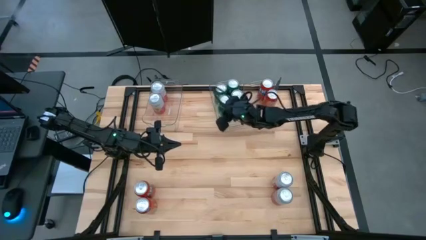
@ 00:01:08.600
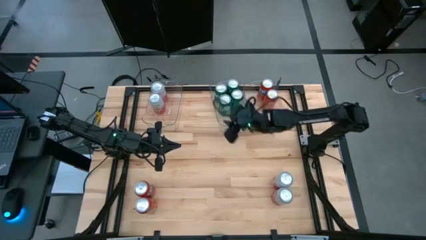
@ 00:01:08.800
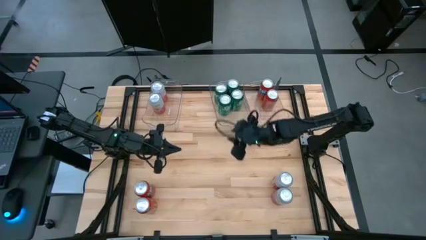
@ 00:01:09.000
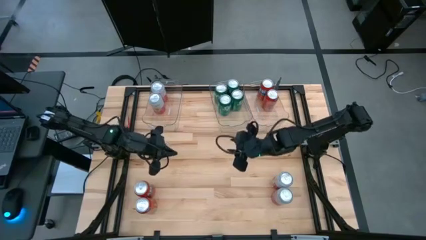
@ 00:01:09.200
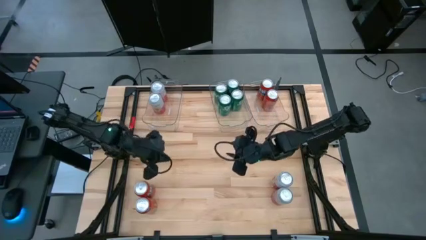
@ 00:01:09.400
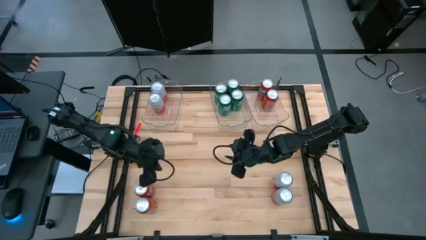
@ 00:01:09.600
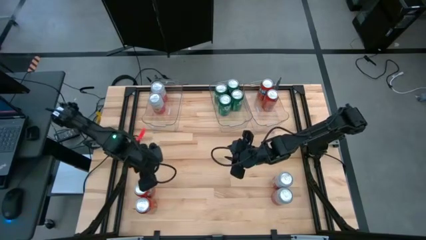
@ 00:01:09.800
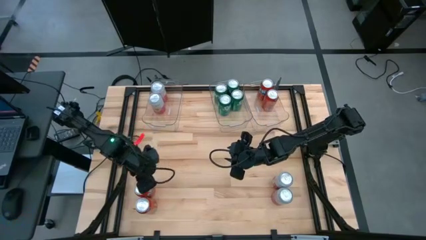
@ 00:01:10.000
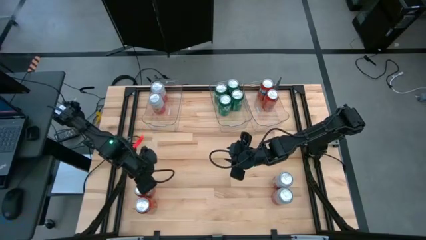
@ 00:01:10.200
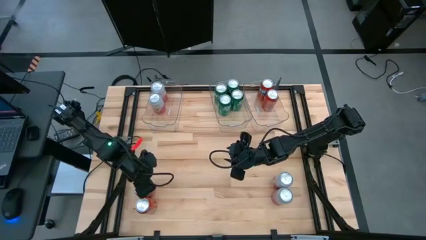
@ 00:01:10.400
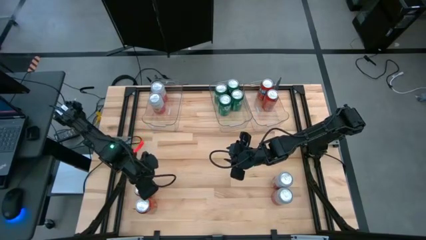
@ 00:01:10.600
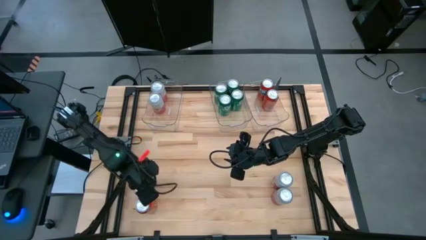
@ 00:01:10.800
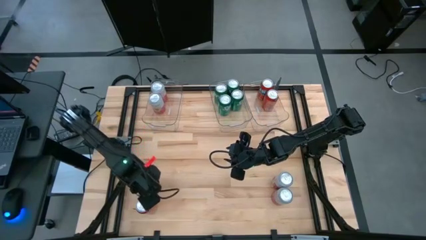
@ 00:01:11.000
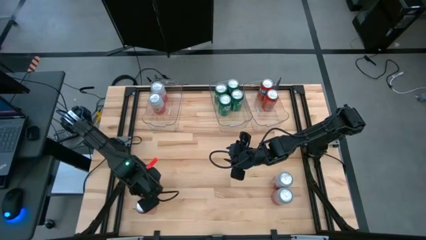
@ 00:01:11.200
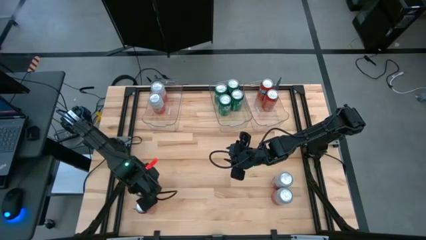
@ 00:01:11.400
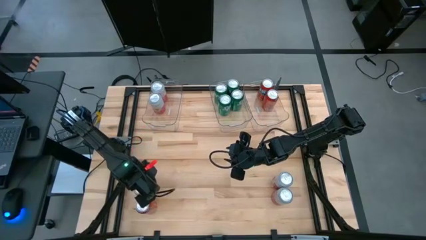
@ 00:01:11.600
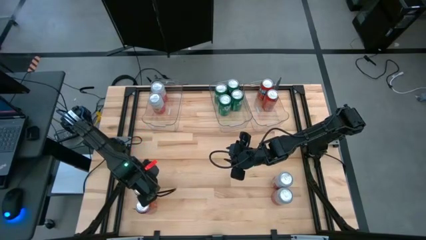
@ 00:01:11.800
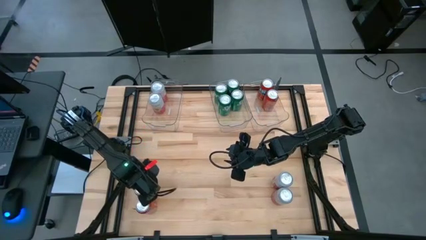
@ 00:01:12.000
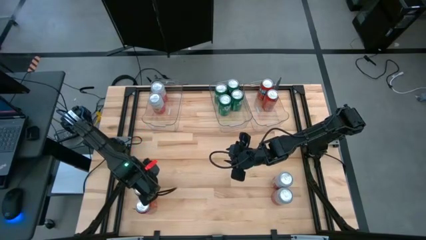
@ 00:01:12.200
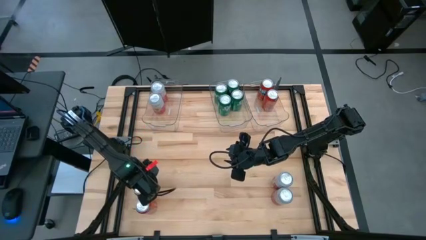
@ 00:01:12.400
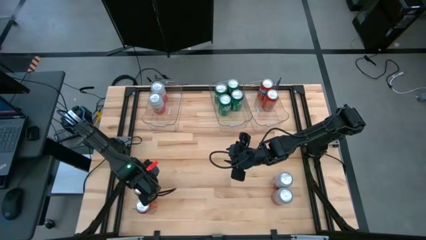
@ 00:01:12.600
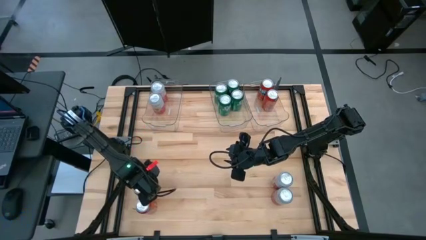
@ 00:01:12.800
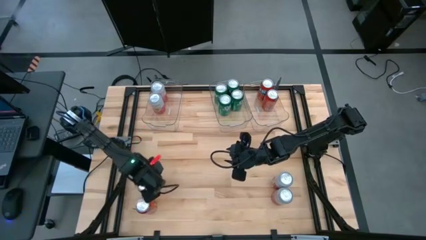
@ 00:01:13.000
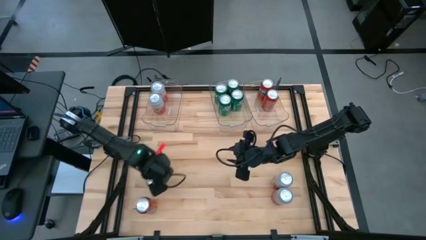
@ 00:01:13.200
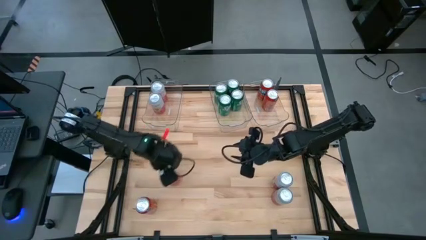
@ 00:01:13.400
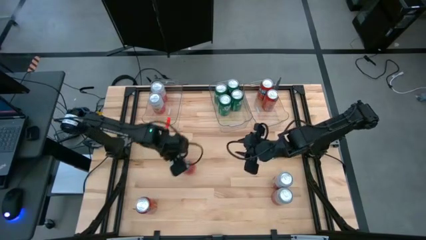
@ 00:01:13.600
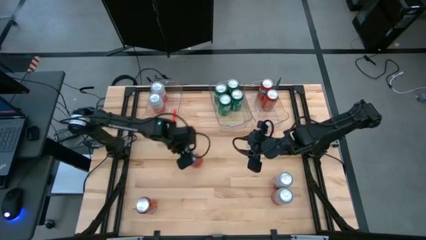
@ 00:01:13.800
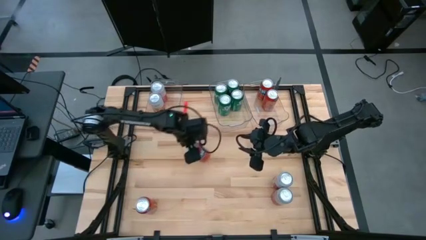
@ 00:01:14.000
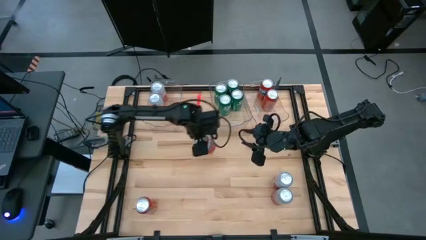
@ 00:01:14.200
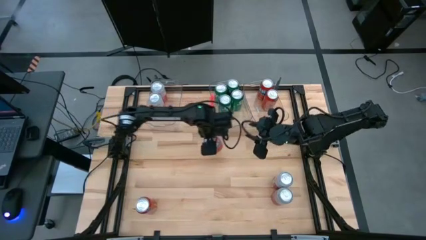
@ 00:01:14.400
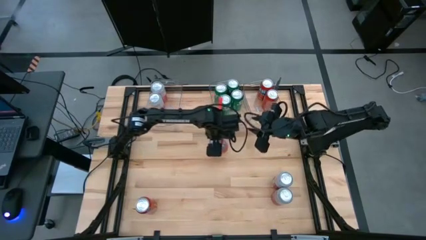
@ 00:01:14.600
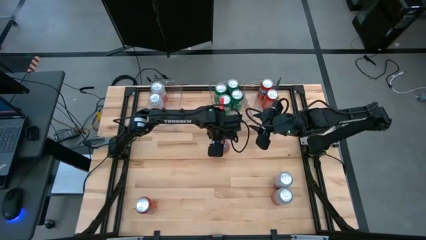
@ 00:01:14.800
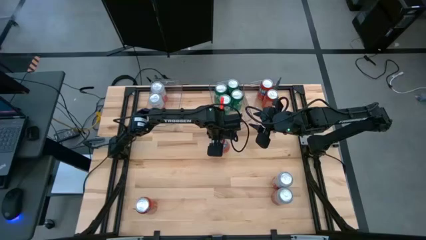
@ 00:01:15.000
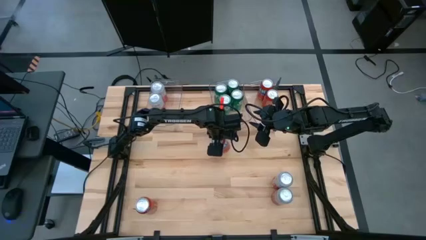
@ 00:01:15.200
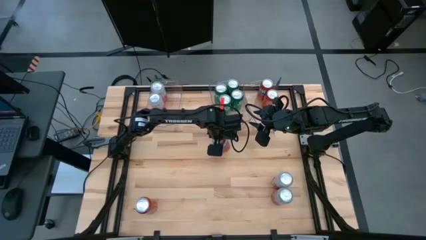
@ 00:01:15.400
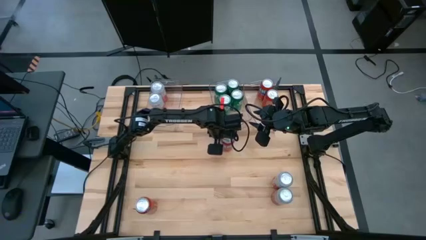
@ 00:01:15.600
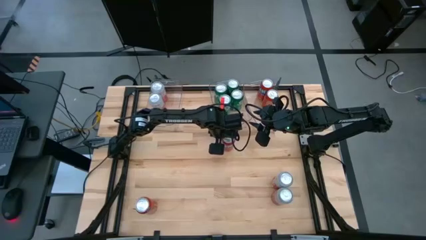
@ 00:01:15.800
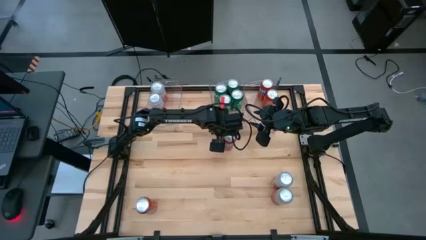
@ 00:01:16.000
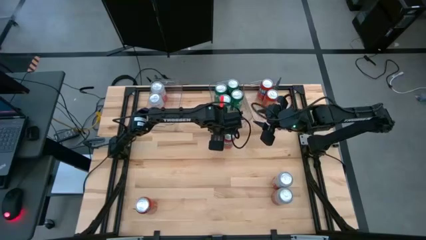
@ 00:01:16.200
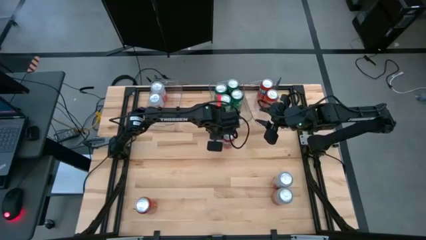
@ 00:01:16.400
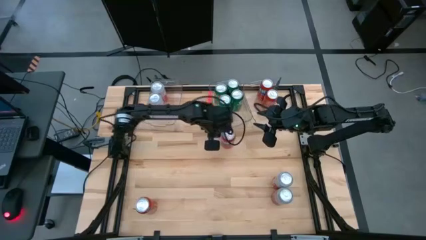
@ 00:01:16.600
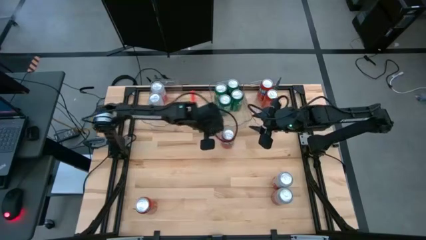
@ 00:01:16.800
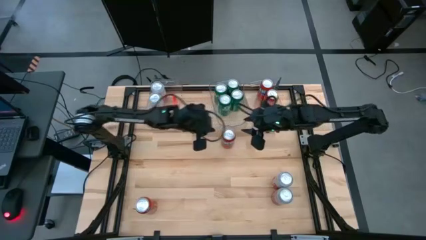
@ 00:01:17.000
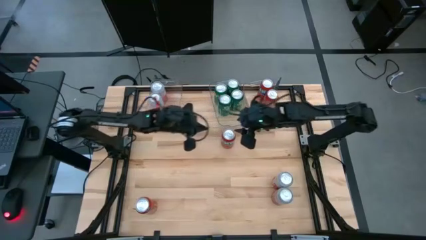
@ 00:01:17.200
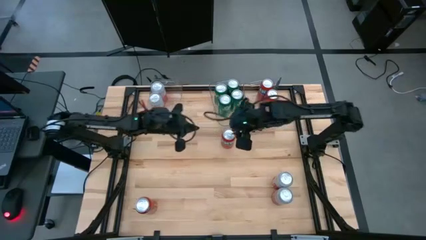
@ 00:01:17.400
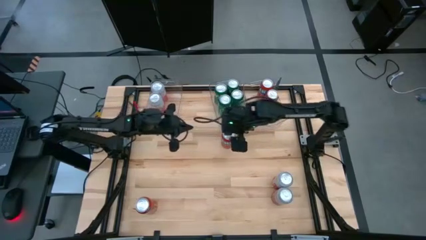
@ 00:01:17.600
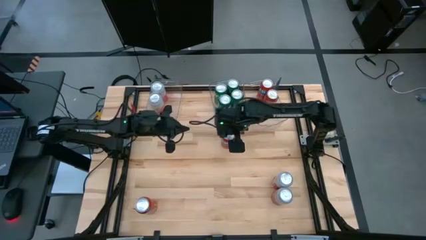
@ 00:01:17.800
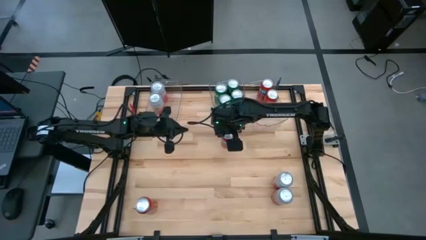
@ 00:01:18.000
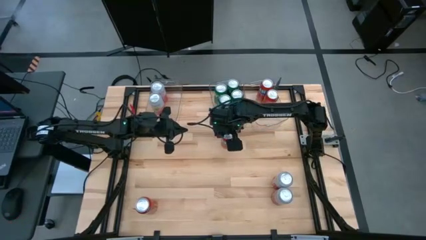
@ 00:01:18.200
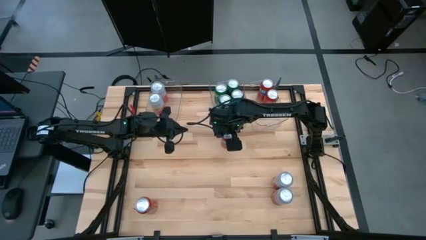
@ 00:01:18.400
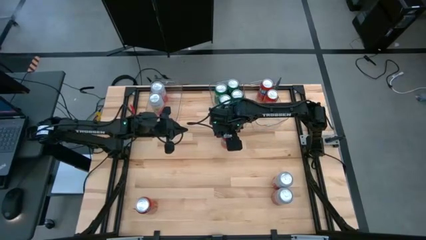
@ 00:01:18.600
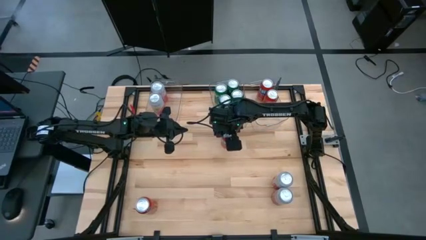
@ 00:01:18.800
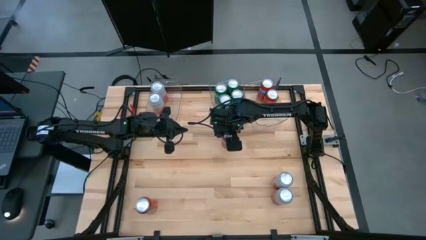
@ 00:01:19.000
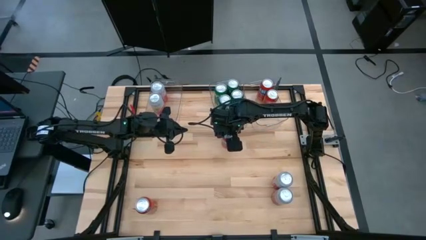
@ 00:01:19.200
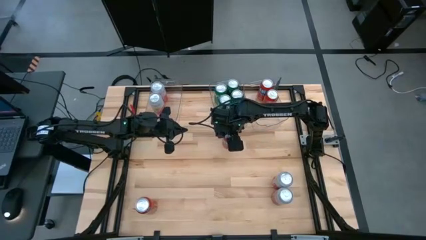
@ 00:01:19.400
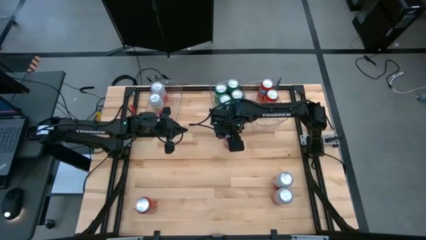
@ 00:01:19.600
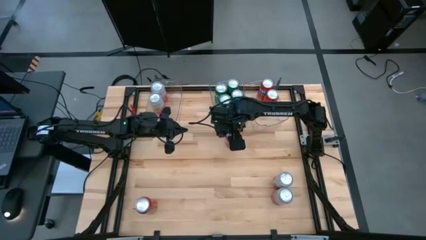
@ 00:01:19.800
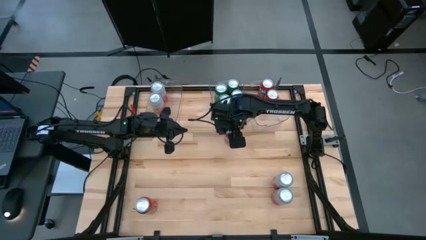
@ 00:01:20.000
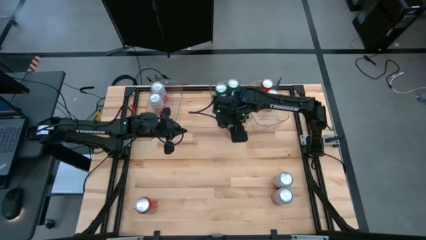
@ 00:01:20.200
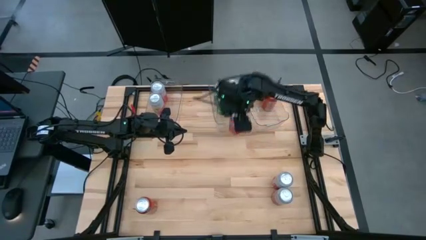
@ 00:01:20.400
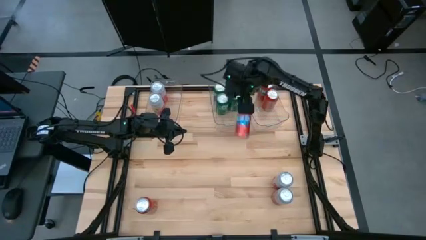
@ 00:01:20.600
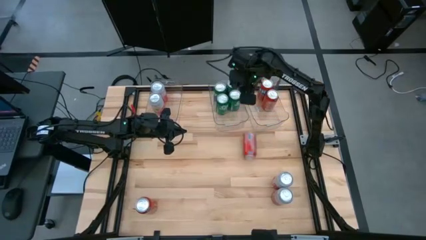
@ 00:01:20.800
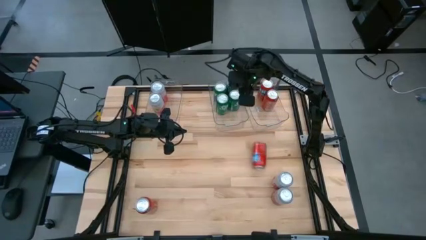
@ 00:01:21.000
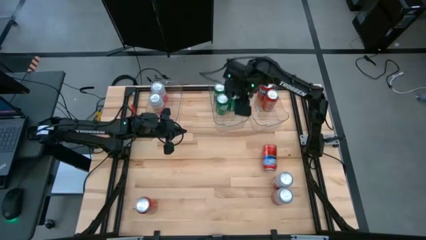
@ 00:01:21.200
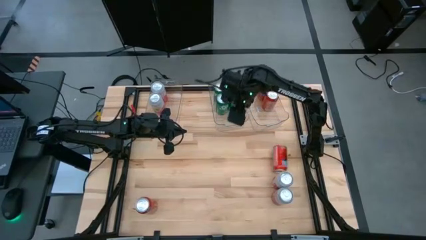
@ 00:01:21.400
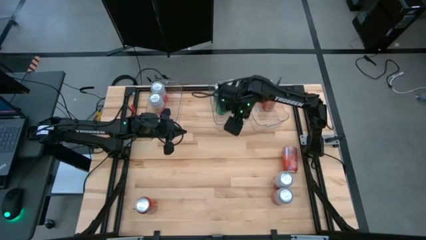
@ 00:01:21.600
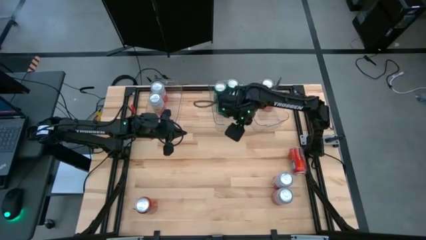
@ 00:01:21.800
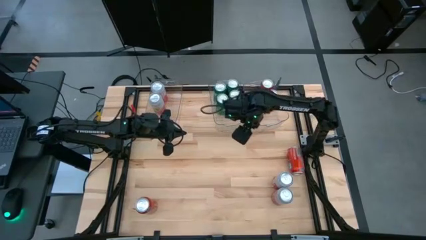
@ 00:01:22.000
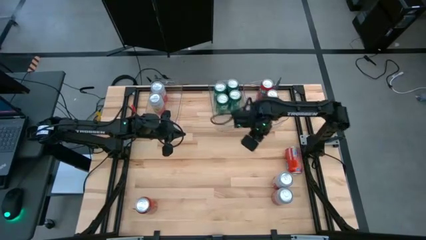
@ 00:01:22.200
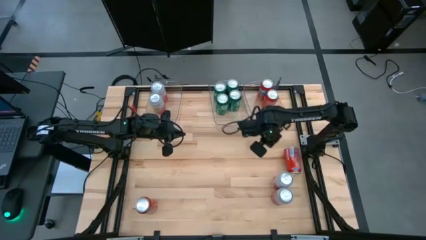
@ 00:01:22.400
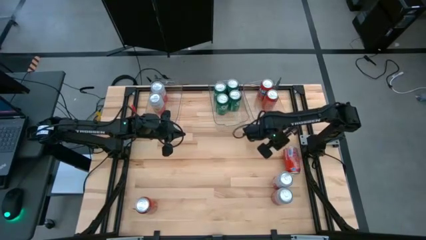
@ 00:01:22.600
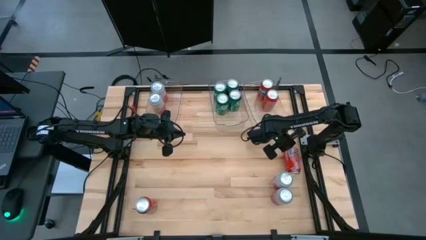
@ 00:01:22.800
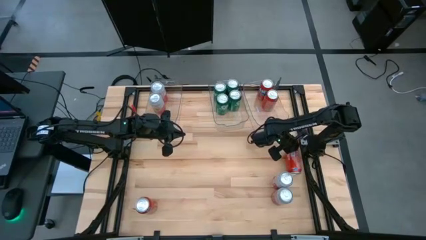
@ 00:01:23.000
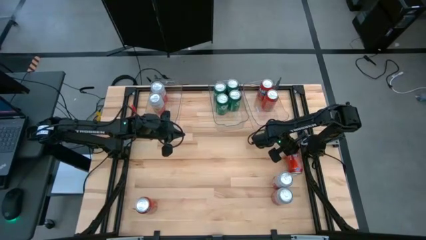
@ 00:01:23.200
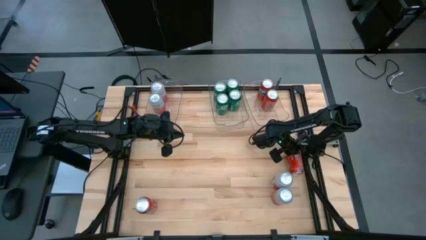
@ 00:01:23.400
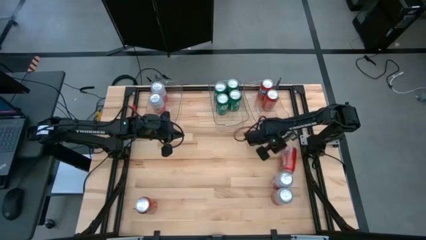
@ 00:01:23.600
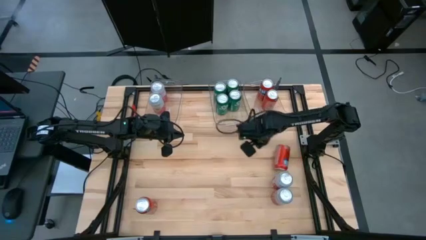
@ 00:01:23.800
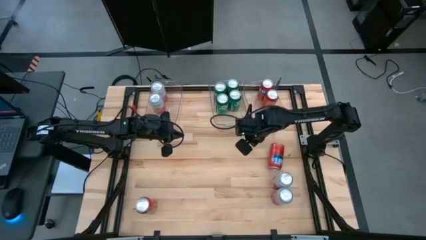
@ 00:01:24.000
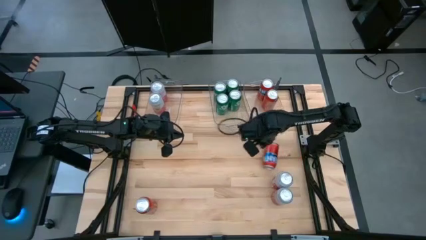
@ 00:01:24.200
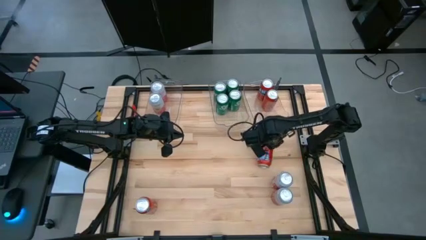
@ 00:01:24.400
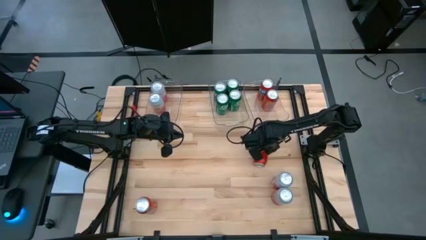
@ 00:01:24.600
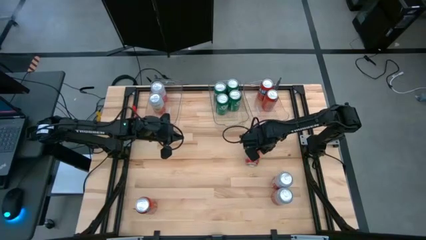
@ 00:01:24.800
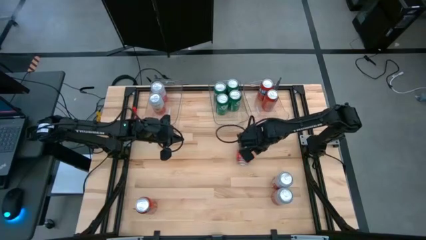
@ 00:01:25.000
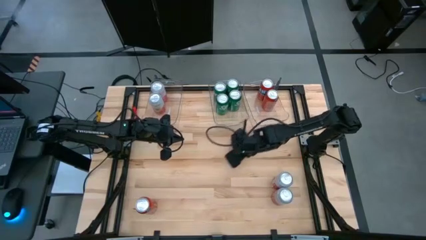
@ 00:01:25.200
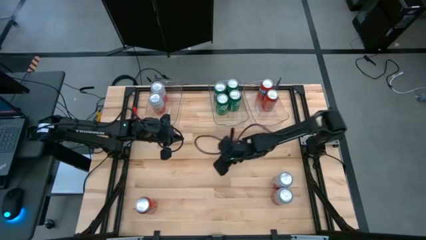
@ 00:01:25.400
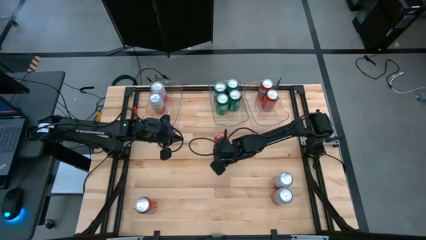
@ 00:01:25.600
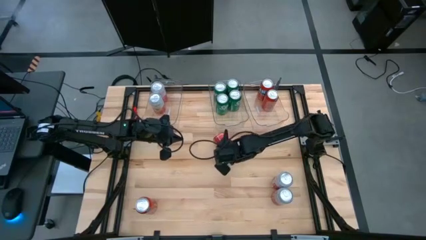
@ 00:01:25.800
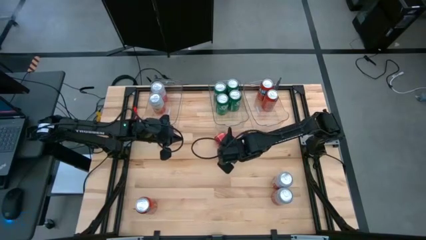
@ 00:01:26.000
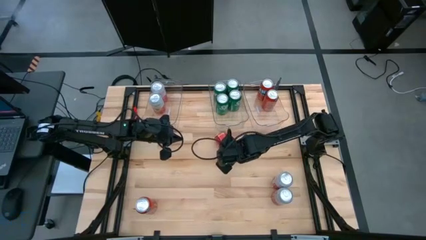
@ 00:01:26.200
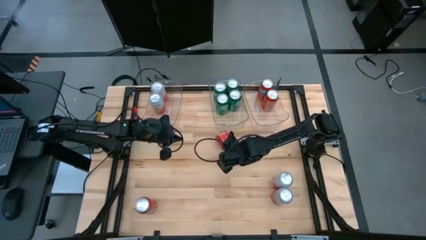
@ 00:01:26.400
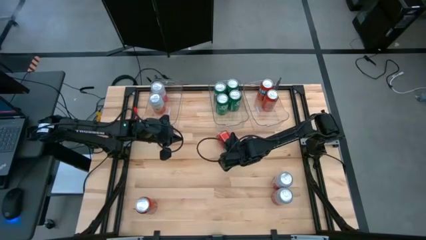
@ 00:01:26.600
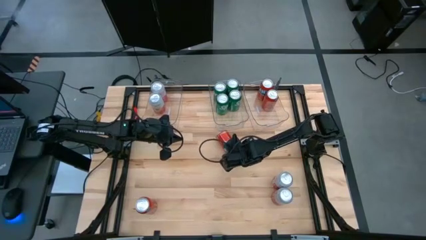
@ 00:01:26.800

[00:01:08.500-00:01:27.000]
Task: Sort soda cans
Put the top orange soda can into the right transparent bin
